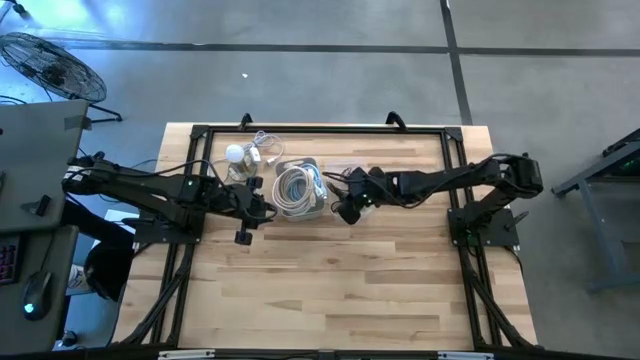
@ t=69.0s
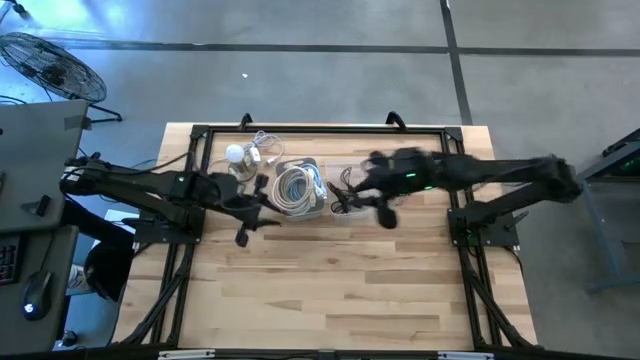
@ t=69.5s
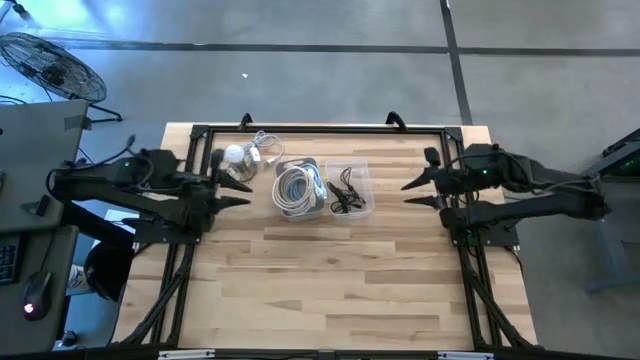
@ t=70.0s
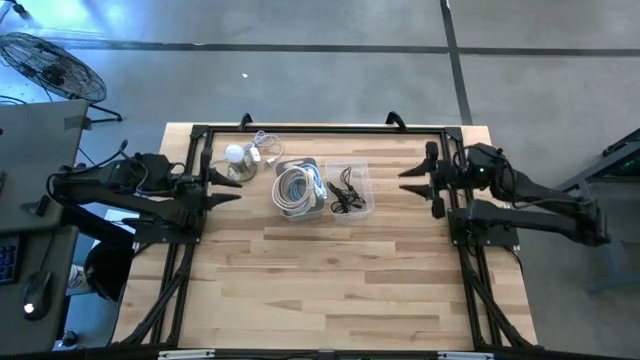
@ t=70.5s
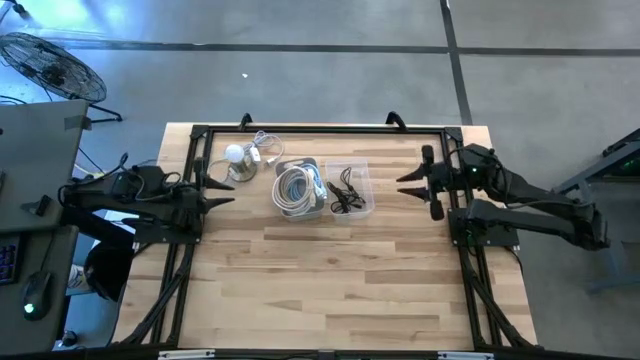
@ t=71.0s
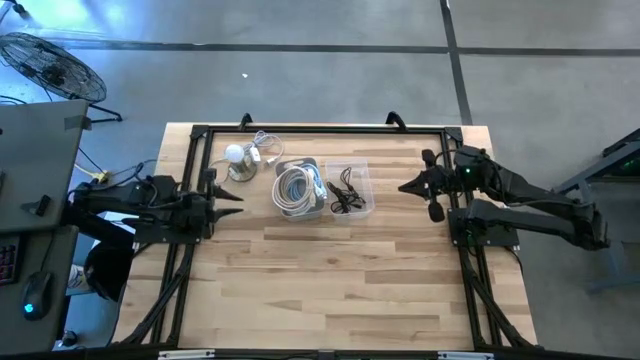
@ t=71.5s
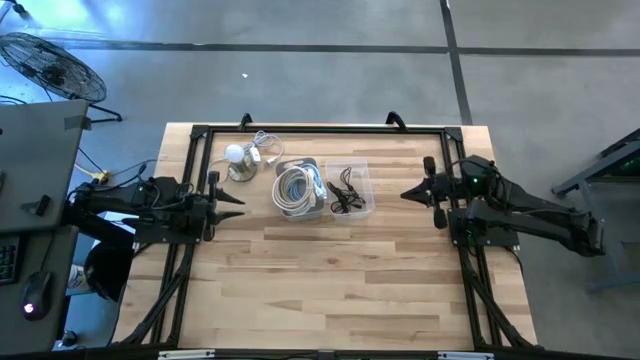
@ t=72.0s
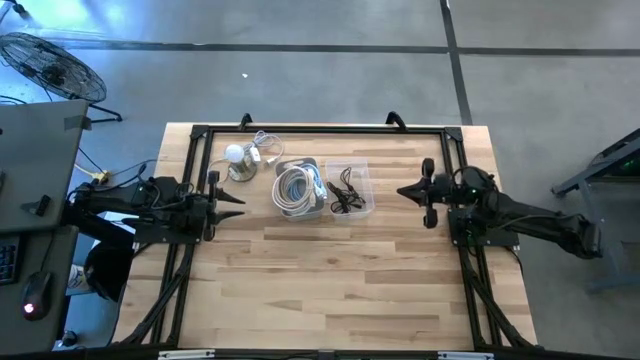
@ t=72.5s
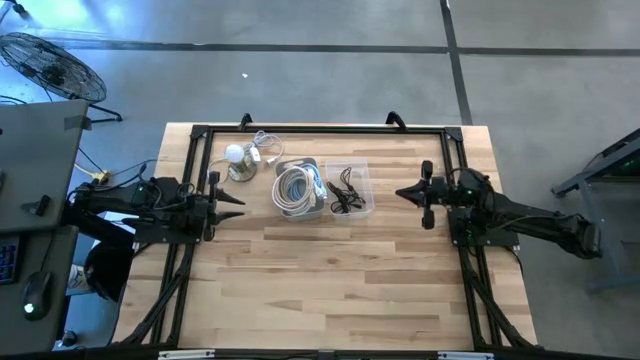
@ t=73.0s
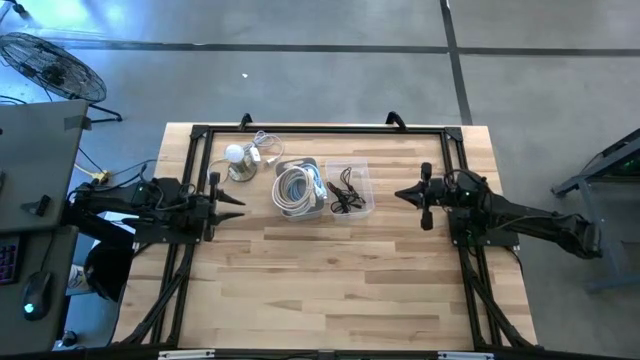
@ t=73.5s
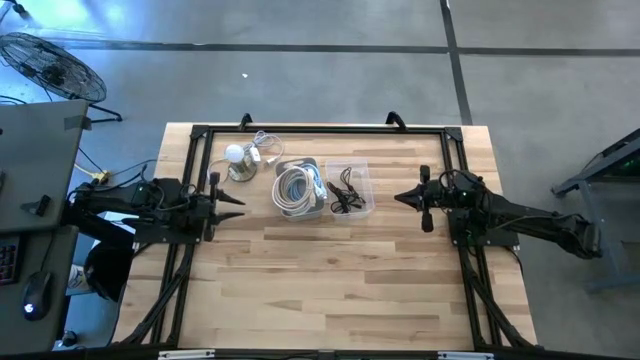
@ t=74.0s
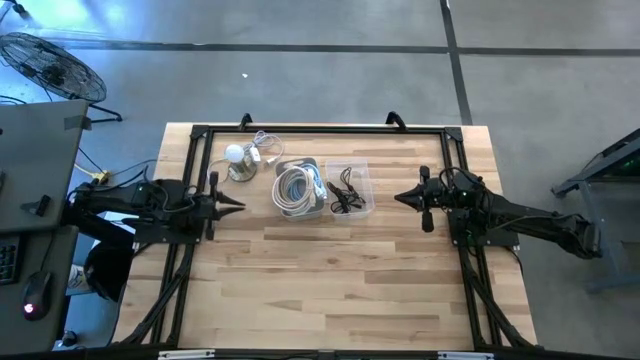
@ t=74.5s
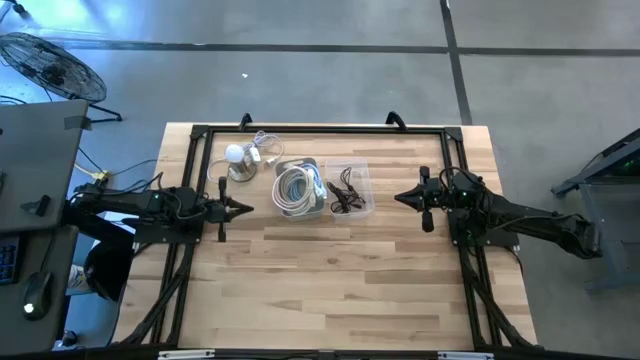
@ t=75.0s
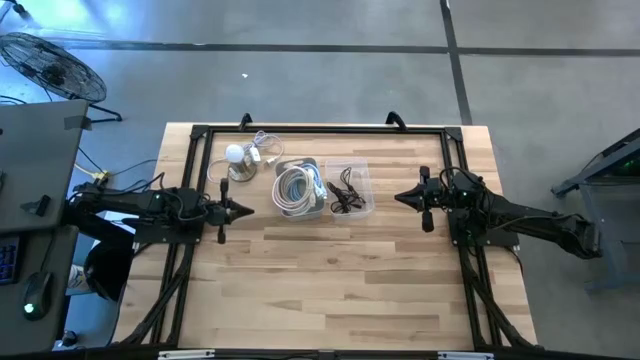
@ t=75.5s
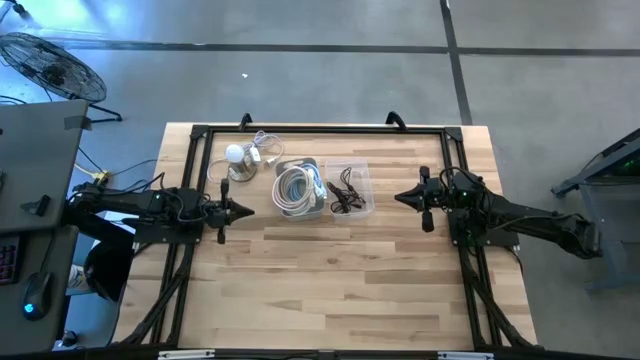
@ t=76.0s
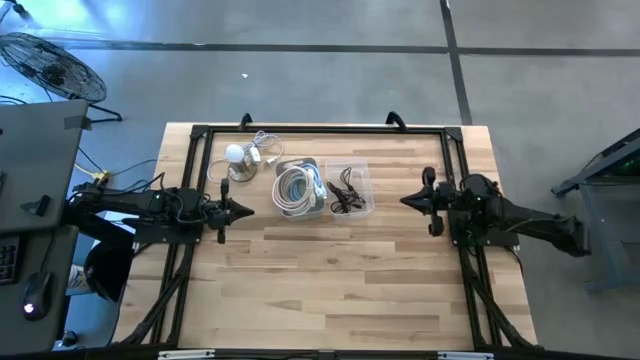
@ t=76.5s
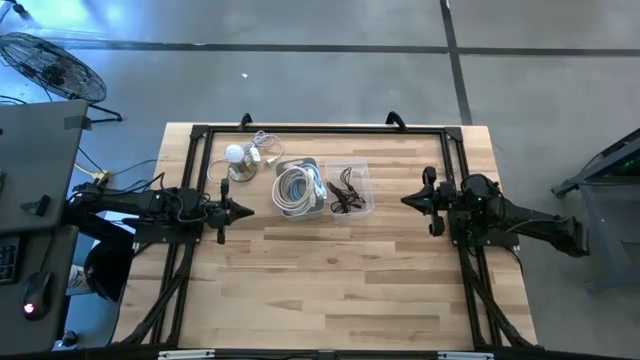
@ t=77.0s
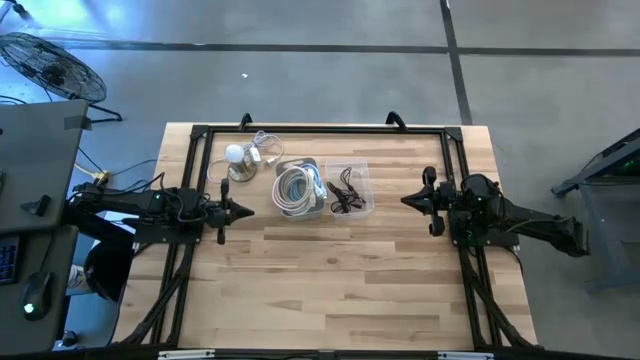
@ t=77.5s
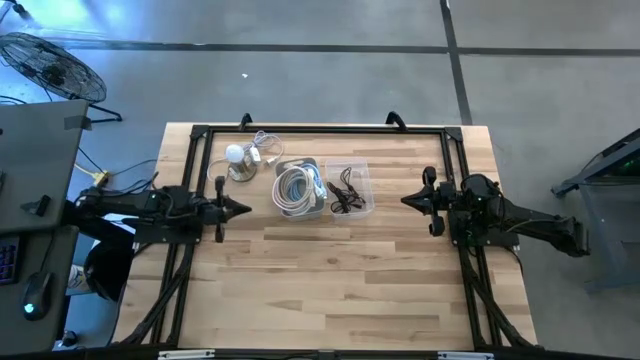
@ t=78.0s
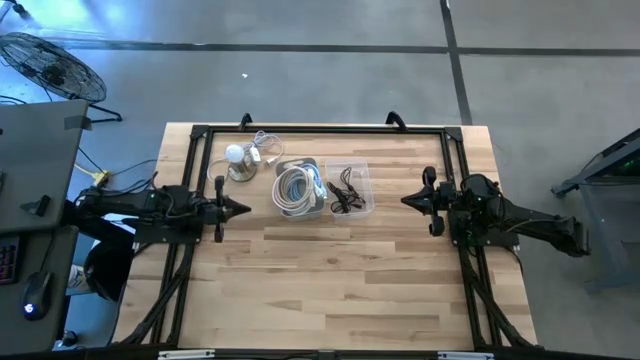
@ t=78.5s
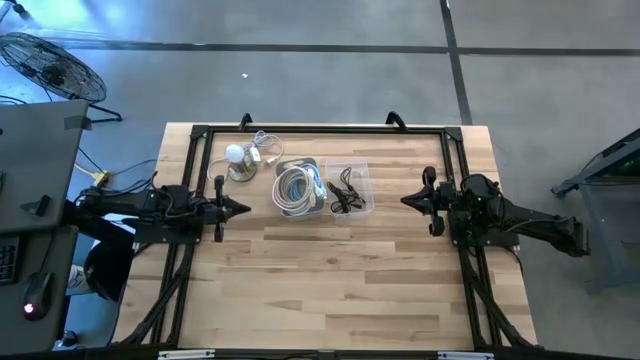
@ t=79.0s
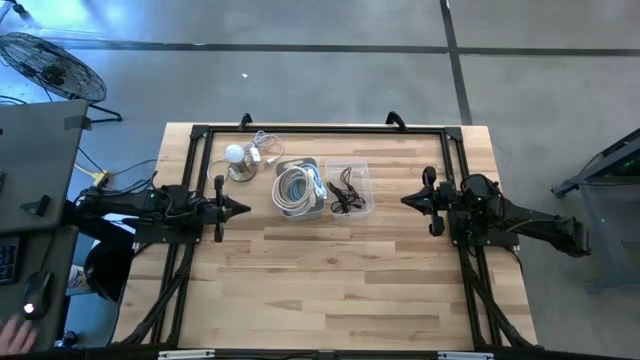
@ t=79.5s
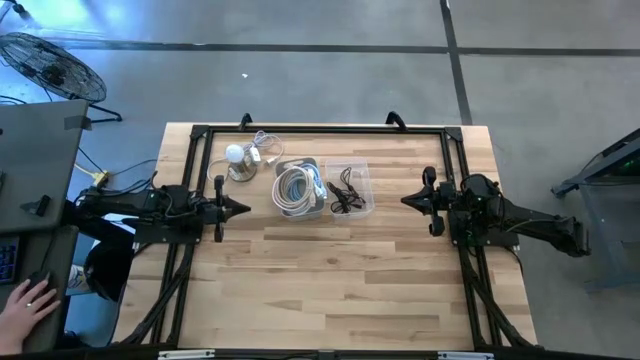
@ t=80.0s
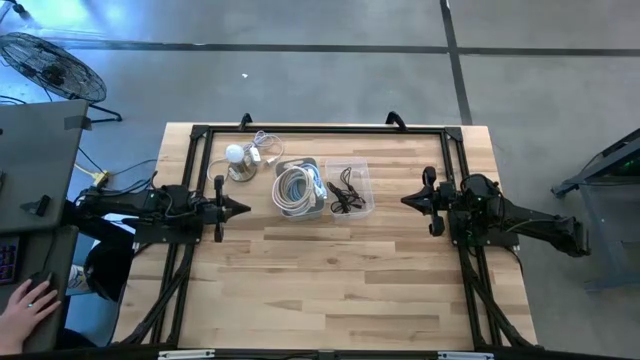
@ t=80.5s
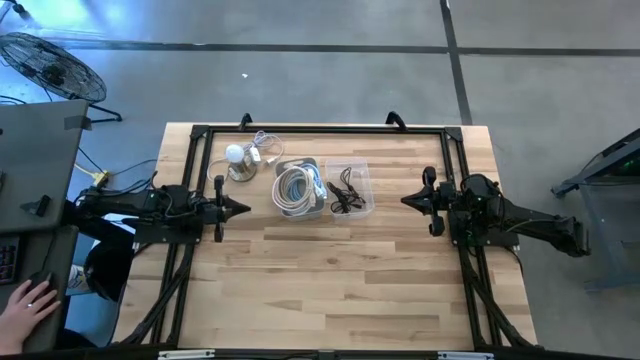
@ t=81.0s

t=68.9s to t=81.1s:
Task: Pick & Place USB Port
Return to Home Position

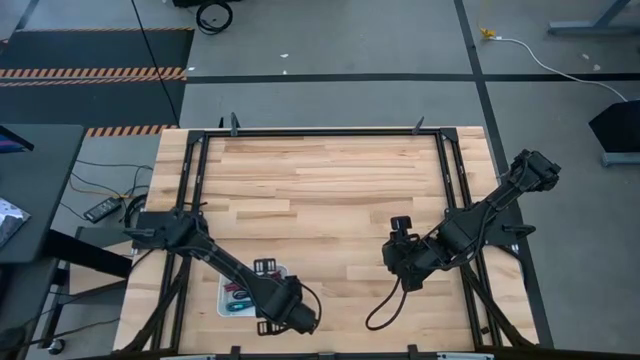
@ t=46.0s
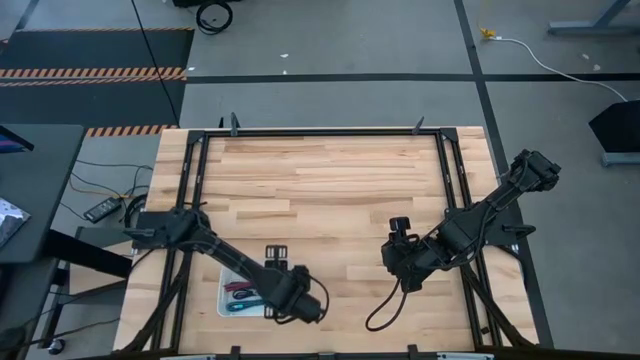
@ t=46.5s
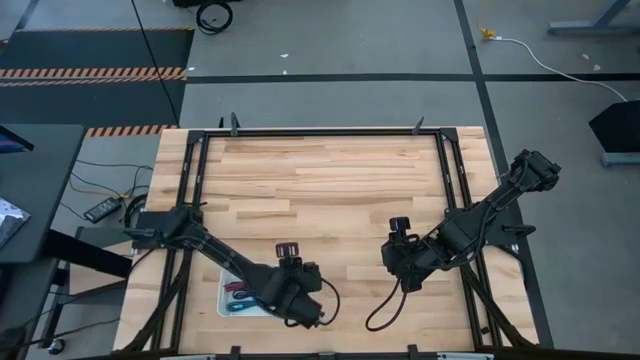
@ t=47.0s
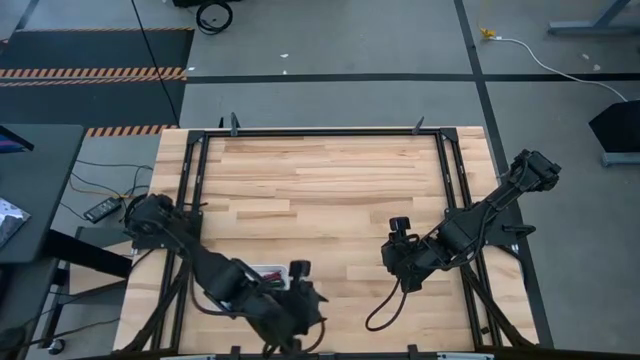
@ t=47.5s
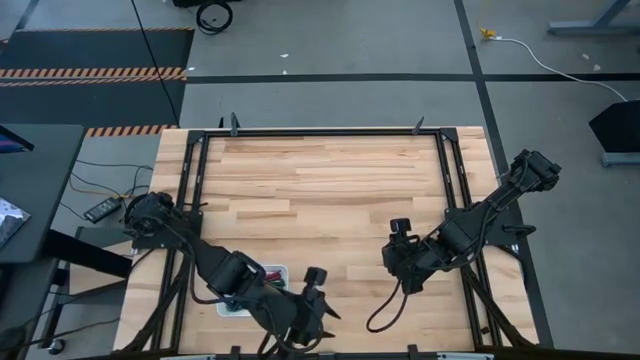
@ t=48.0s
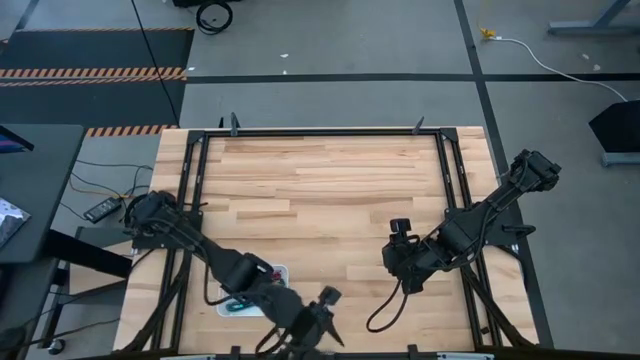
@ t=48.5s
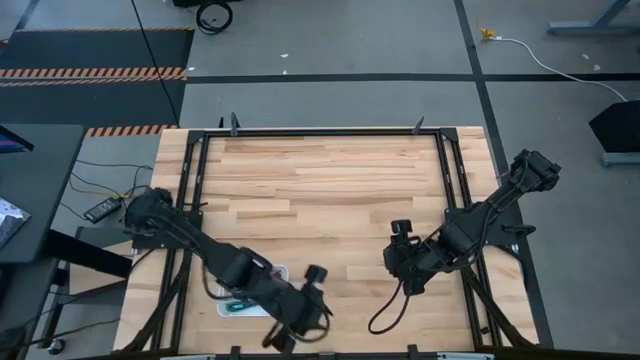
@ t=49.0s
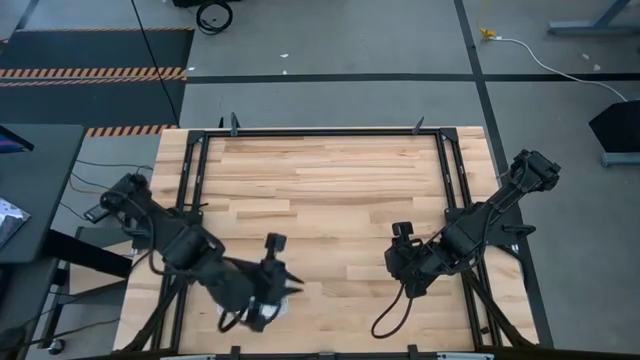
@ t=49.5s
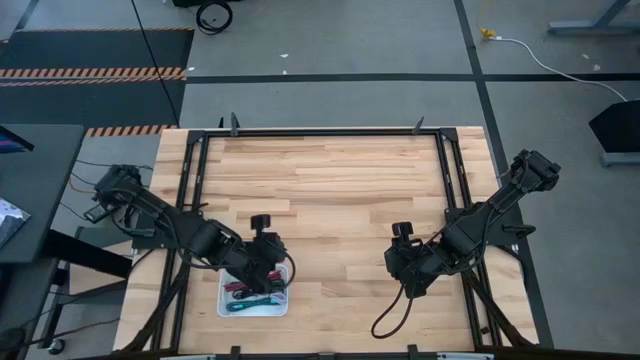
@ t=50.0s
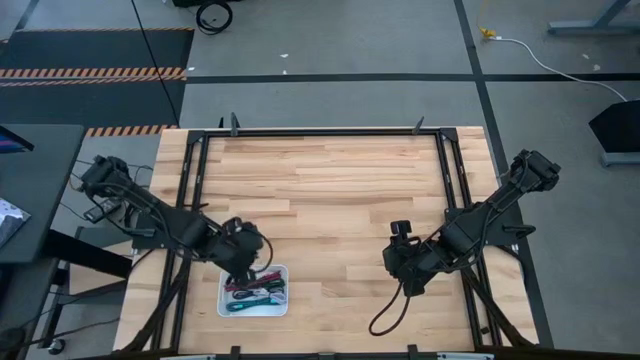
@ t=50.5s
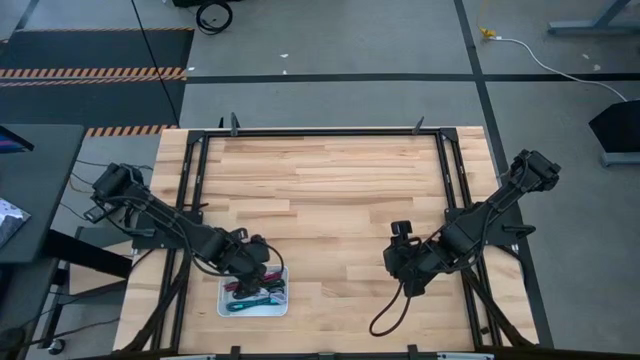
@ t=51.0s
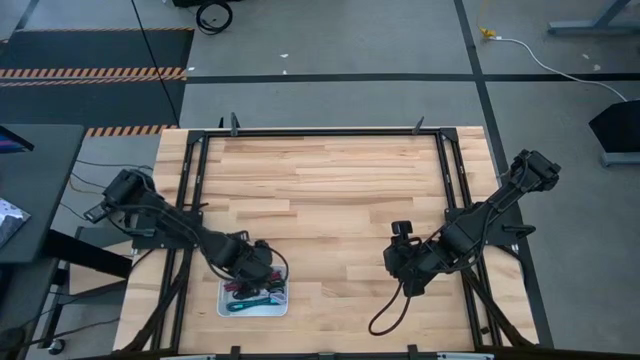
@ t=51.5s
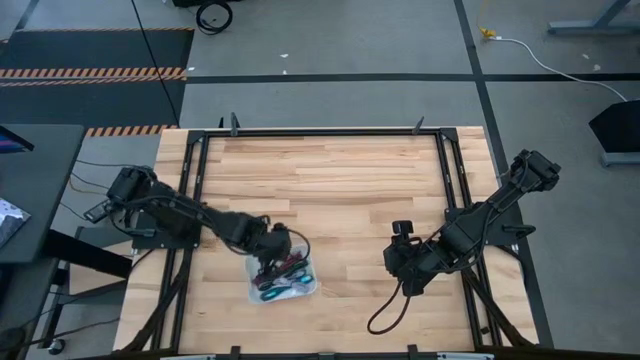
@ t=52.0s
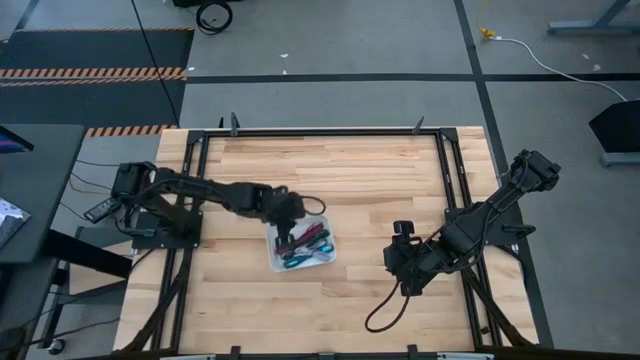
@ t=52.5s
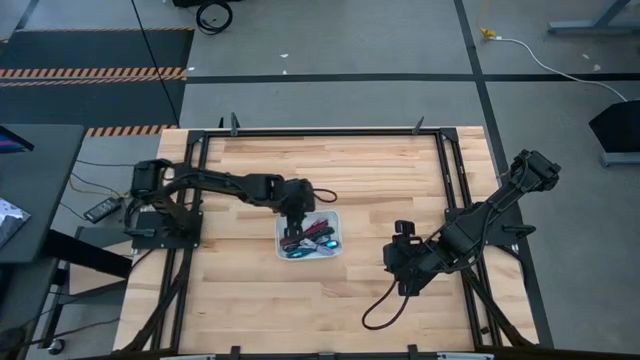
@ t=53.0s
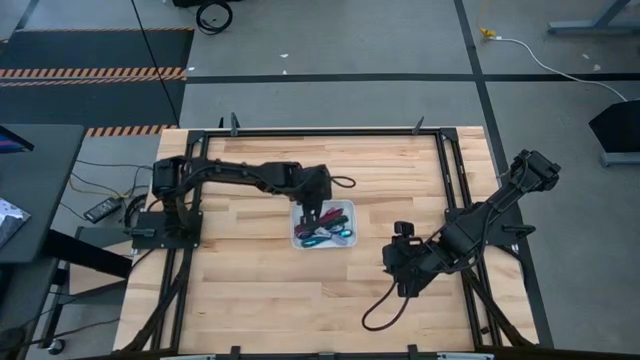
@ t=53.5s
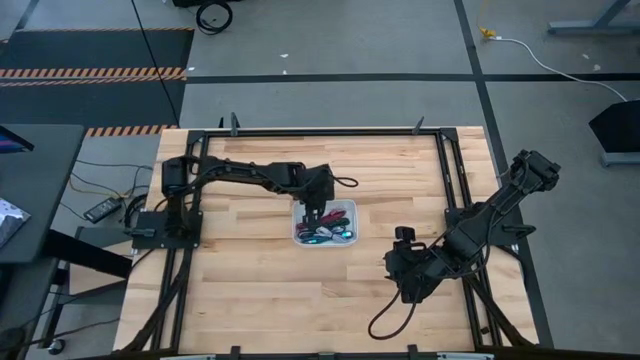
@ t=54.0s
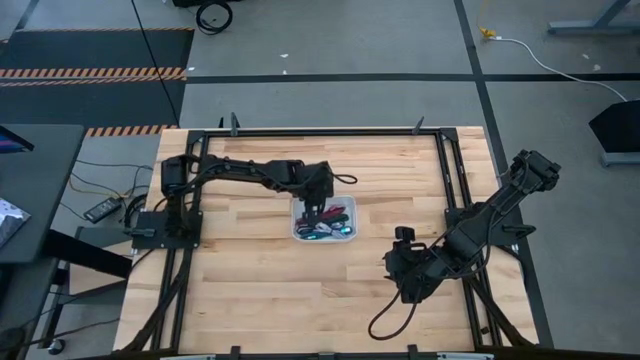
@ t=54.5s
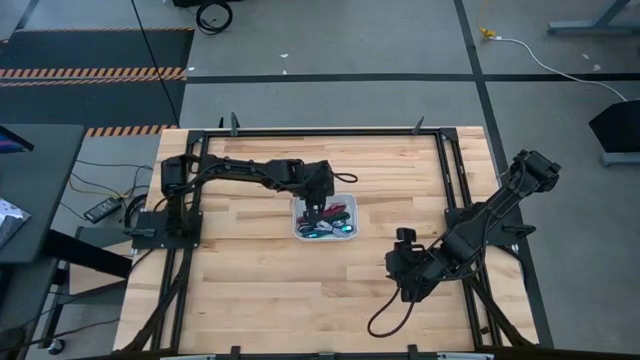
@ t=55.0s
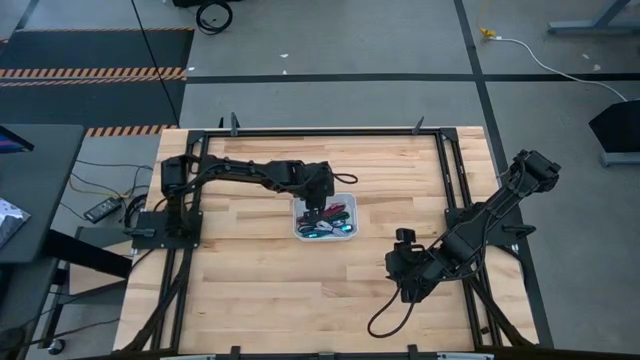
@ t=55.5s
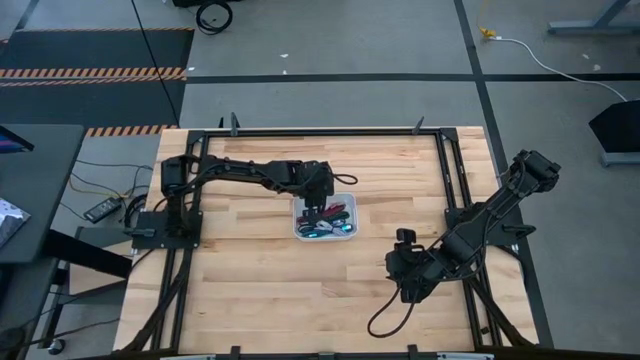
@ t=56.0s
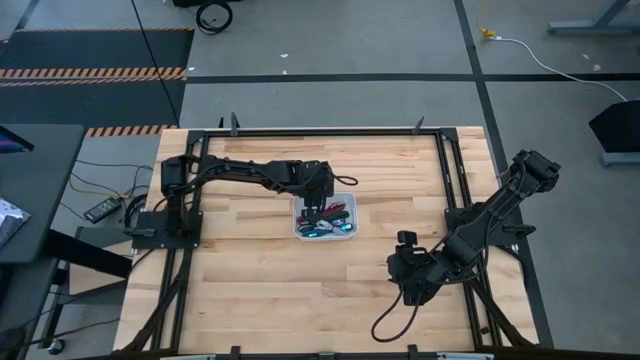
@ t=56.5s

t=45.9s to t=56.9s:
Task: Pick and place USB-C Cables
Move the white bin to the center of the table
